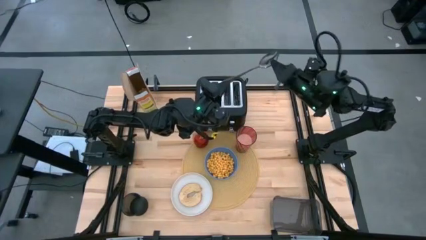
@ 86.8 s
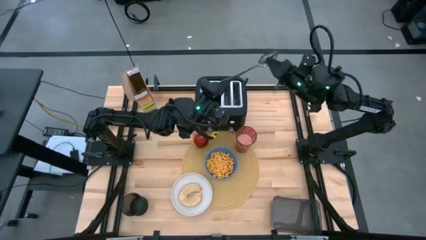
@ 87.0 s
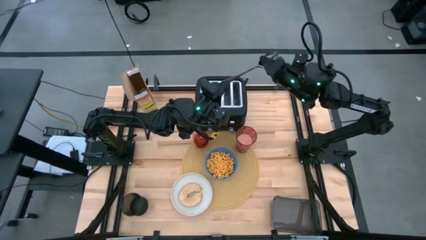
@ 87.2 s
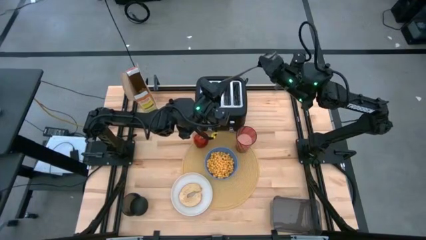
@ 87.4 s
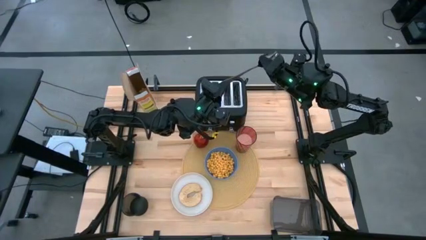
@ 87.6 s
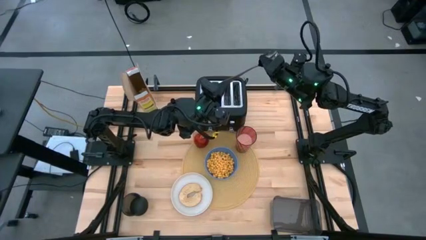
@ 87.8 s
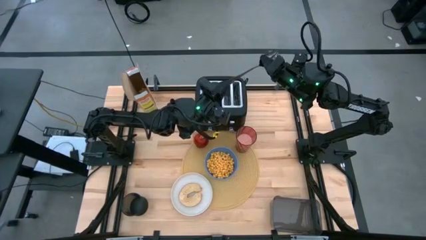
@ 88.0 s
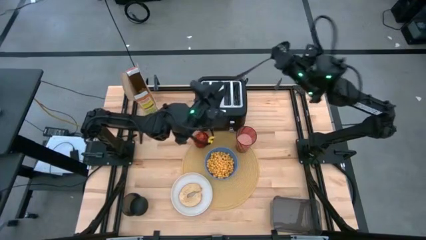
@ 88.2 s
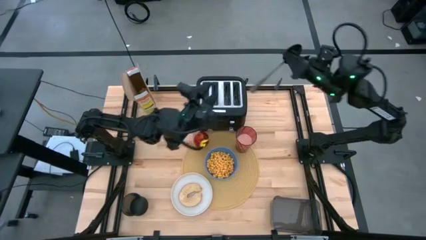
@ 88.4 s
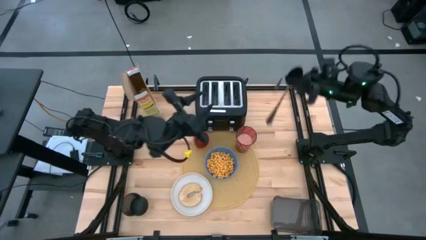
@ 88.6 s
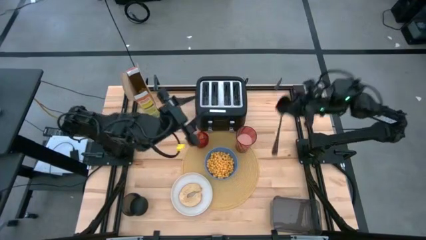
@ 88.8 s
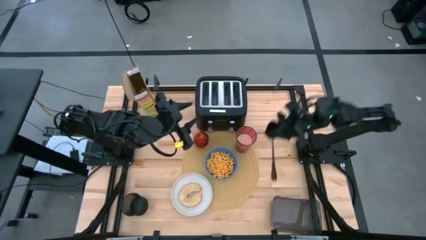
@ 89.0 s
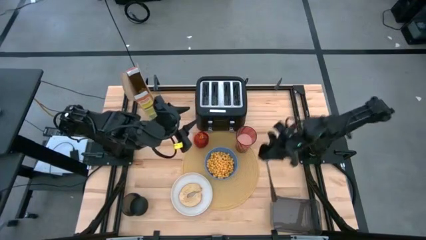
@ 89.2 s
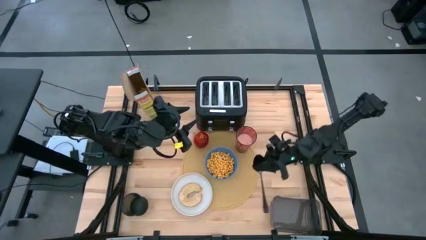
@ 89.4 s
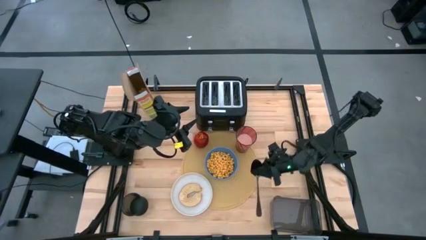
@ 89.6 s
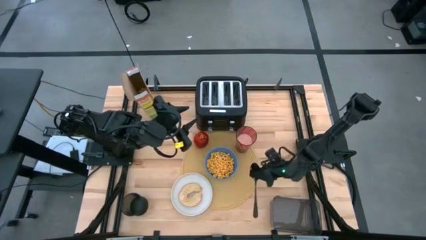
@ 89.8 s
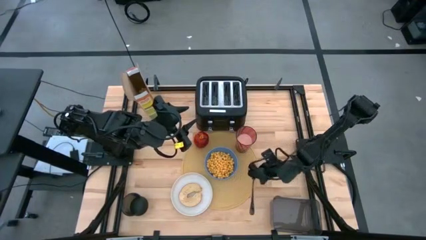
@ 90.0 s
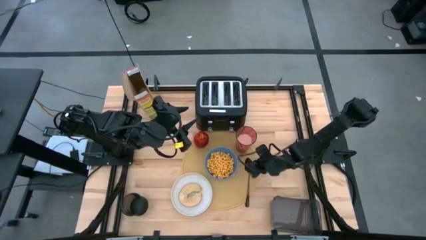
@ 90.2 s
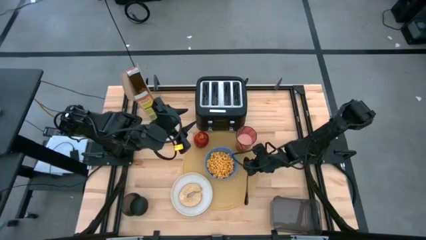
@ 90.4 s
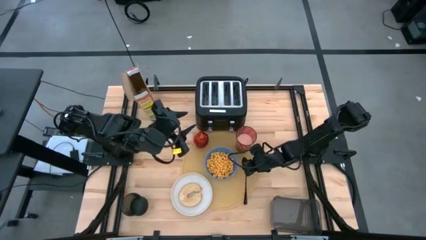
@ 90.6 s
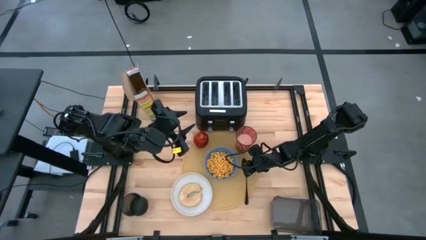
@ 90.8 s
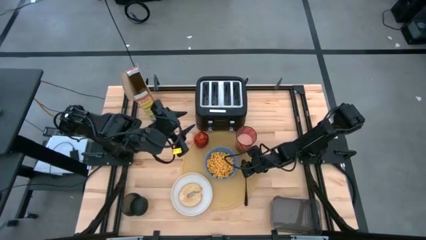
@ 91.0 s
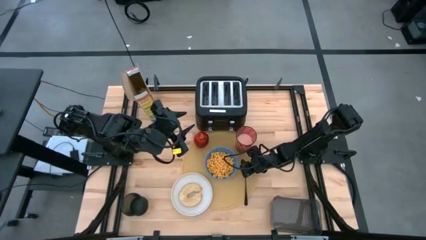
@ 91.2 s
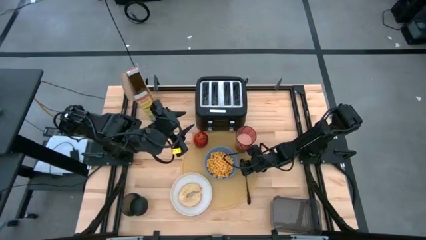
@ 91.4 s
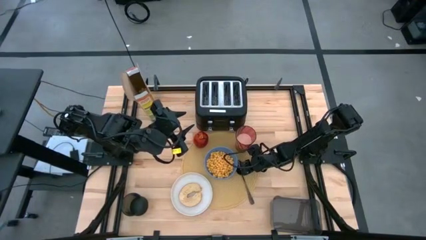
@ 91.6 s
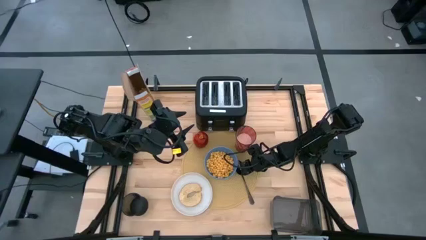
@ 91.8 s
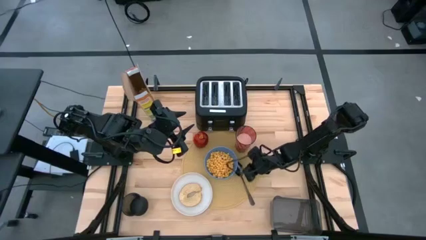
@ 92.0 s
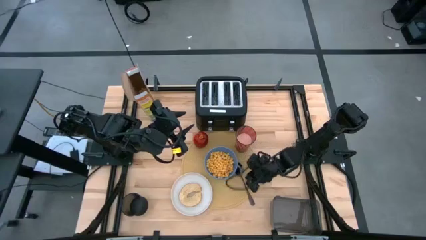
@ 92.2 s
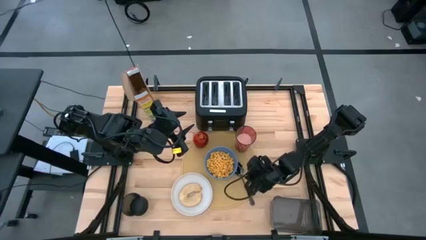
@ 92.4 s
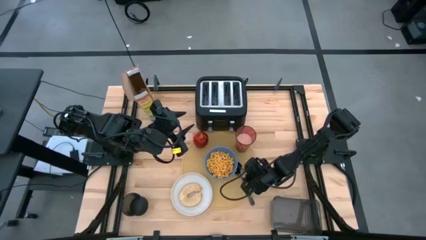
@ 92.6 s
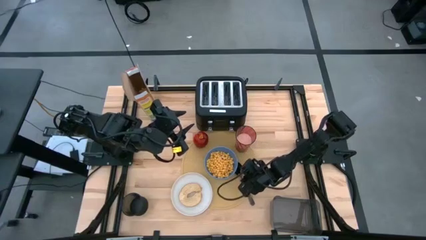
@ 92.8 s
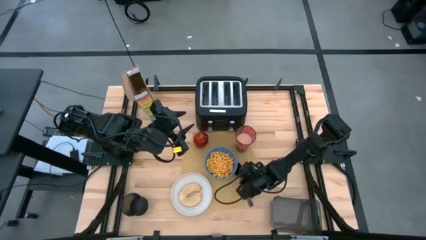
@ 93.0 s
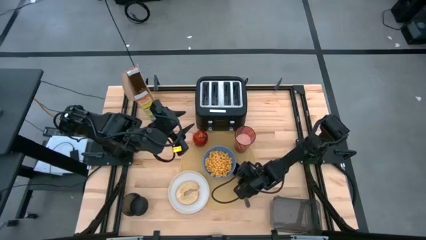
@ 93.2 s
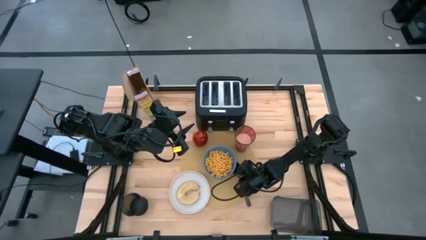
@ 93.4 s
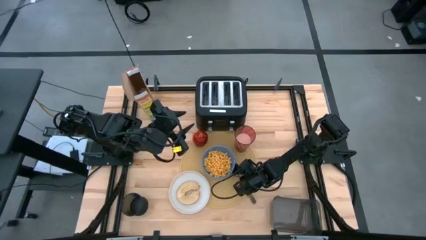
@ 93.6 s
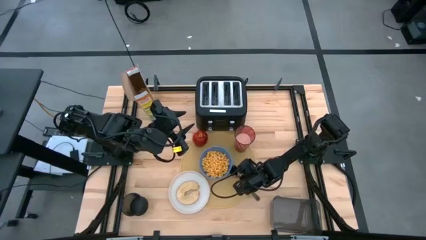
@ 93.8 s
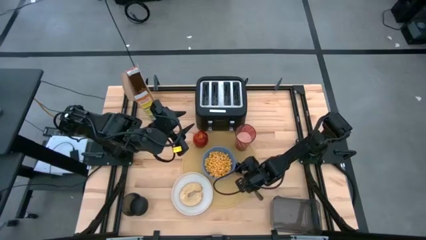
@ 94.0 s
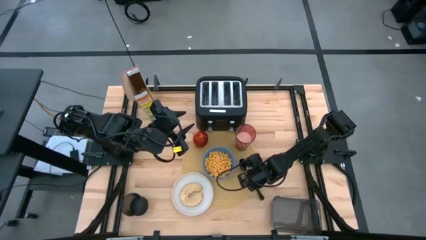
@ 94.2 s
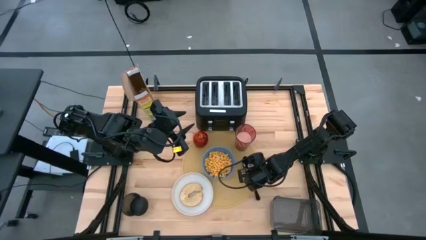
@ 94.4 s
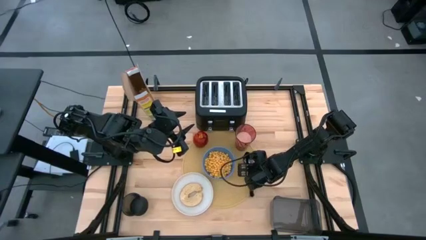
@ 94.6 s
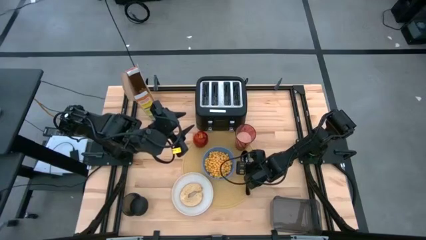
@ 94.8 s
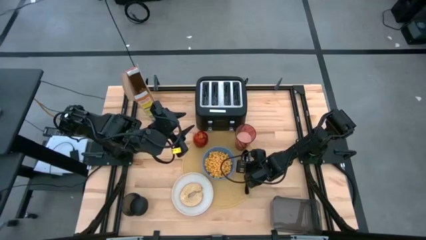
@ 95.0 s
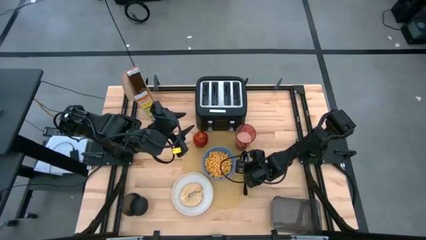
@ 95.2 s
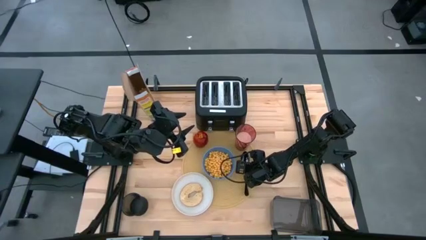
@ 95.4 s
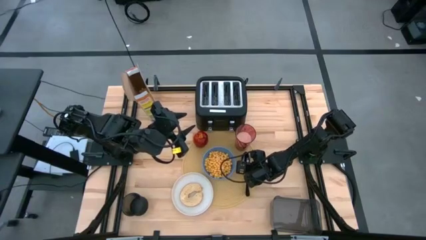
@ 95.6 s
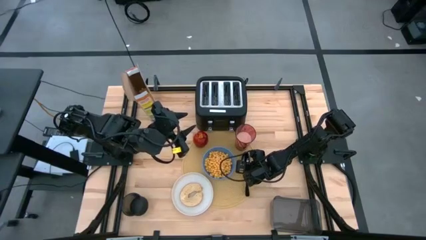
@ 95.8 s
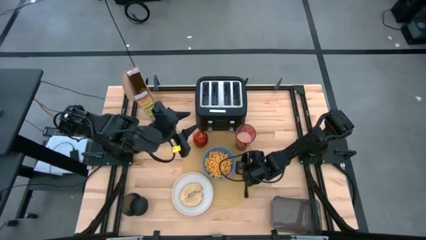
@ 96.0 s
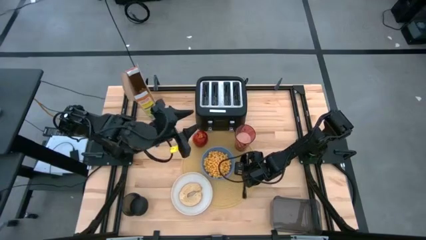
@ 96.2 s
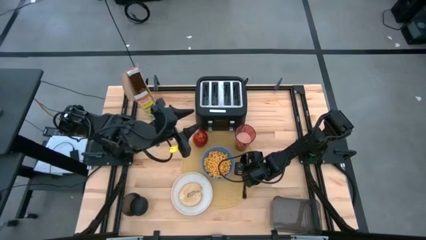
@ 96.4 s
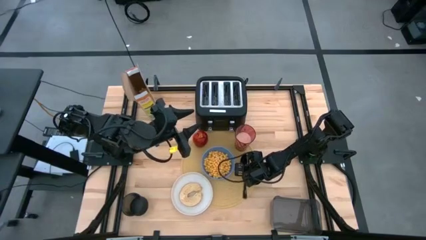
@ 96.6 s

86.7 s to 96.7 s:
Task: Arrange a breakfast setting
Put the spoon on the placemat to the right of the bowl

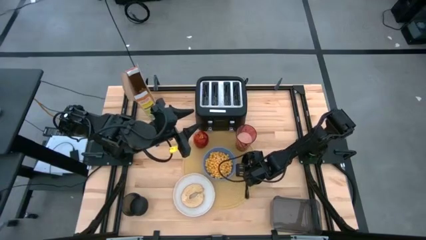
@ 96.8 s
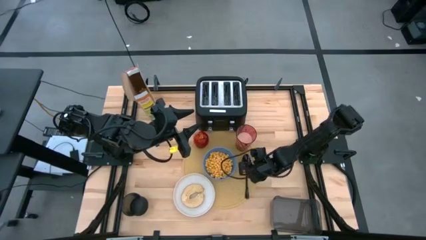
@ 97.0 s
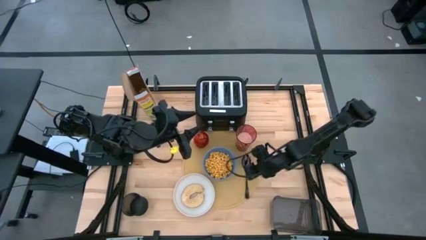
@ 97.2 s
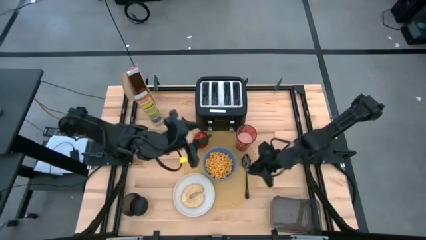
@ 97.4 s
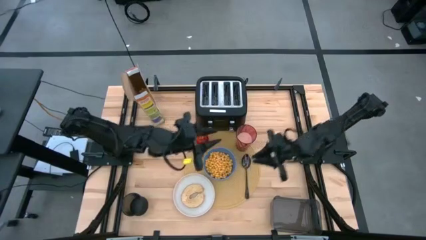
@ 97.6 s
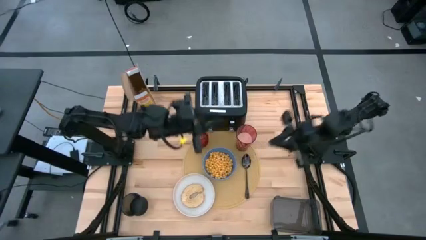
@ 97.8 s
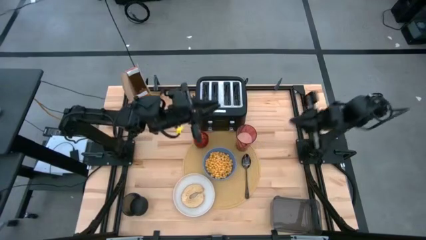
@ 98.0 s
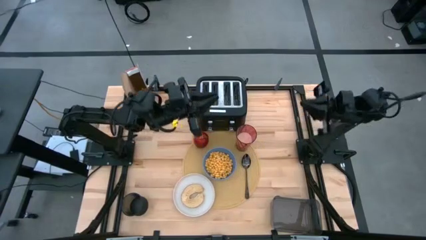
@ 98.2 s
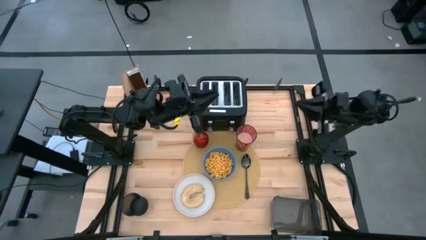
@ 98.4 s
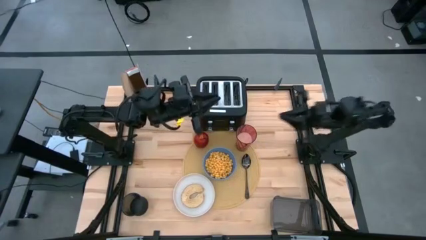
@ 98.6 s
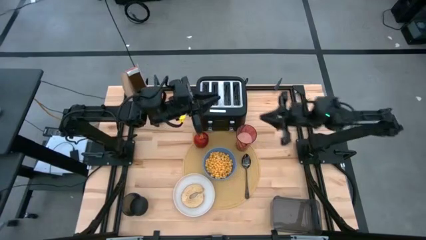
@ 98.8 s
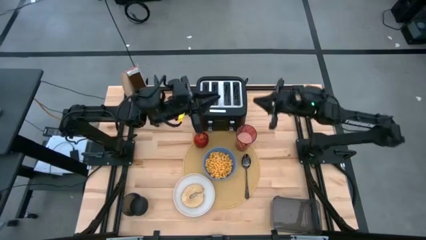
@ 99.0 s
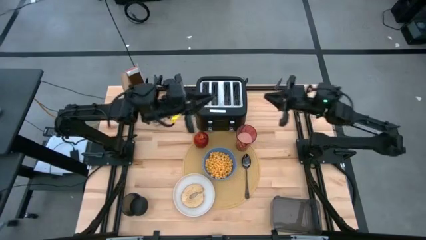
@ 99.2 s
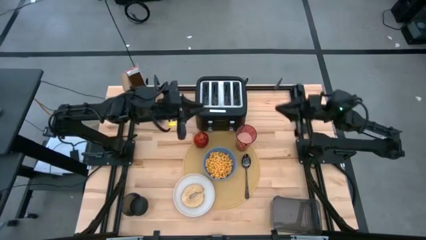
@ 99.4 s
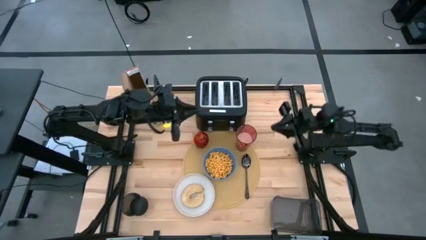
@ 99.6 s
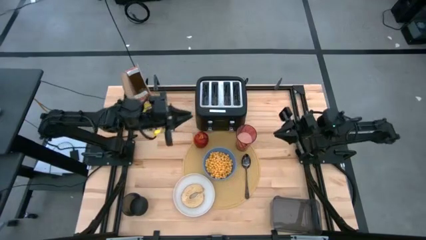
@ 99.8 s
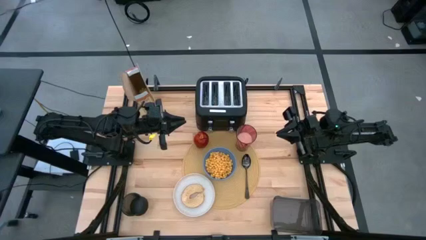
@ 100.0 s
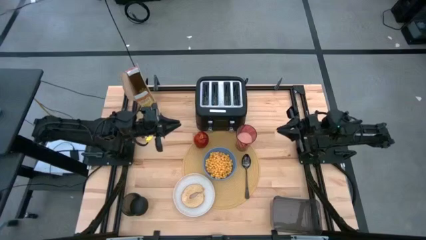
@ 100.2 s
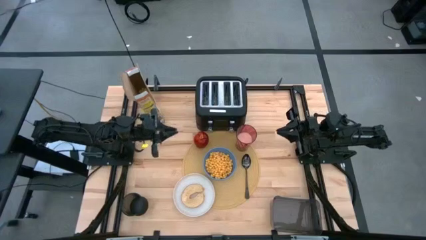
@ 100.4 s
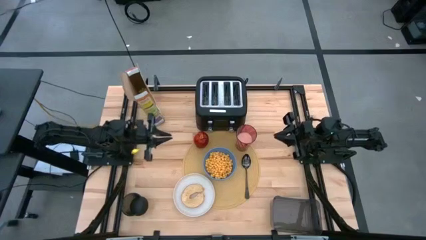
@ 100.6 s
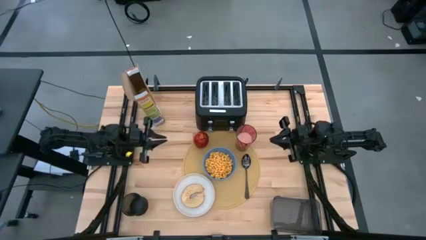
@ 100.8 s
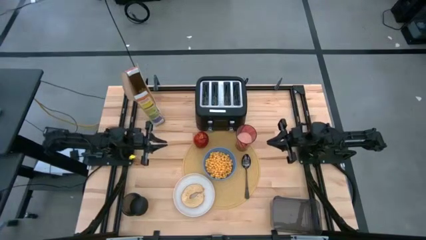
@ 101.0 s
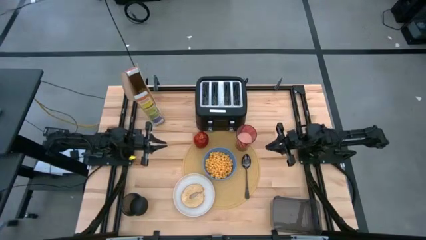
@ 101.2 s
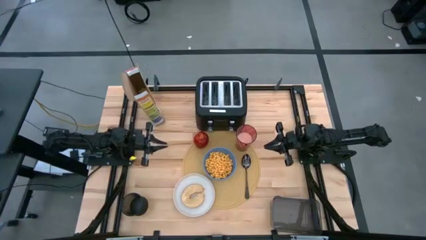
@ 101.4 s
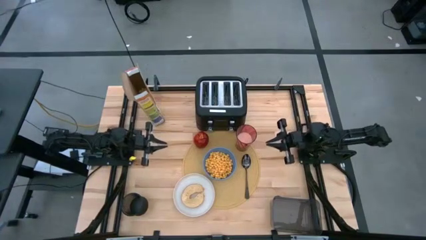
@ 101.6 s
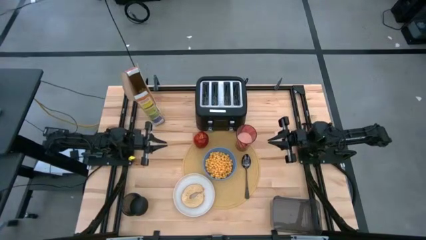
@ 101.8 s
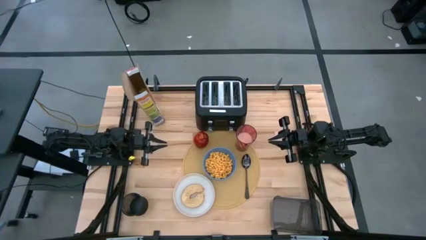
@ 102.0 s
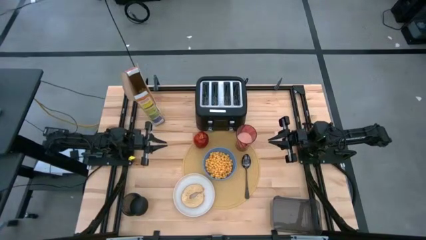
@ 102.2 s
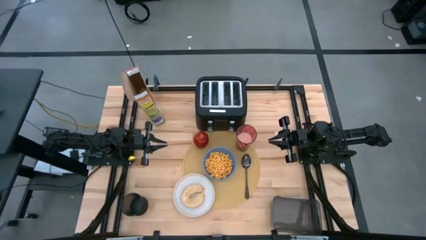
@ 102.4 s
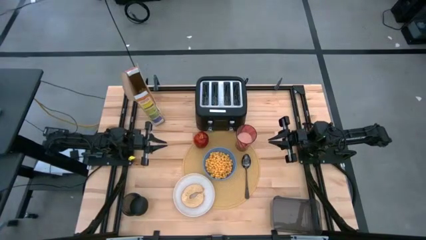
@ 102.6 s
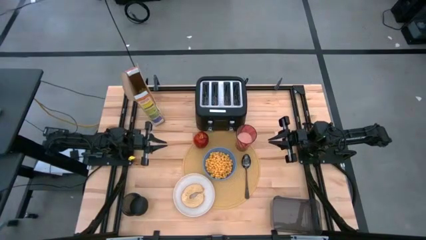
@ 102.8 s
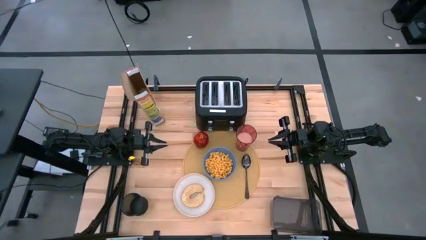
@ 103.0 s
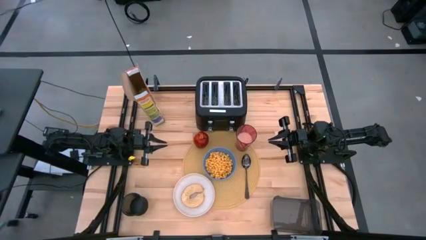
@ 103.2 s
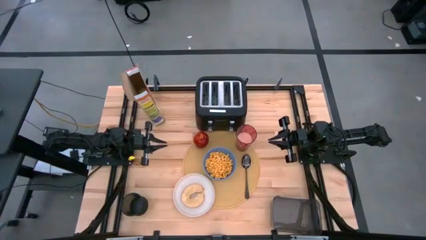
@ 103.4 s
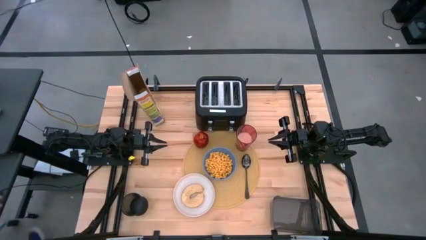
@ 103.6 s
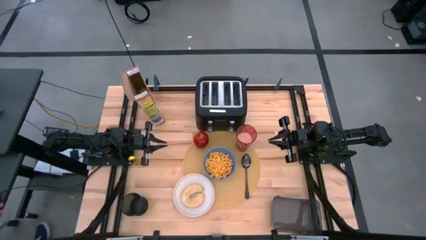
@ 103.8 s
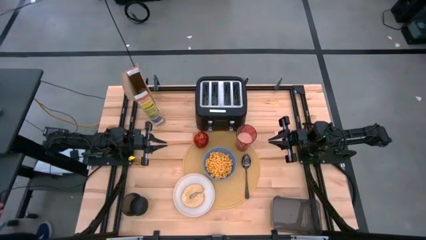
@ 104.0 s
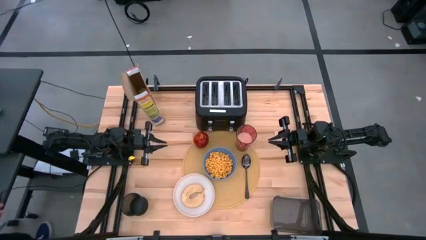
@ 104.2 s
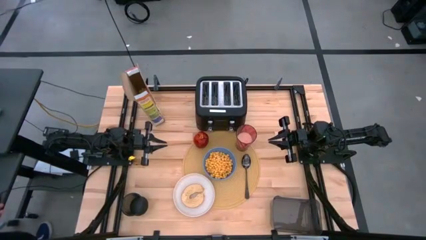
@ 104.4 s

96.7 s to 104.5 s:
Return to Home Position
